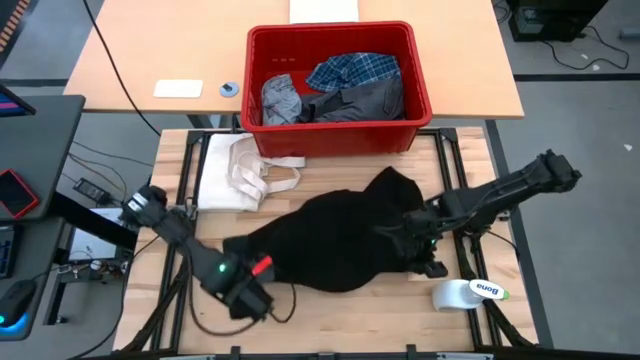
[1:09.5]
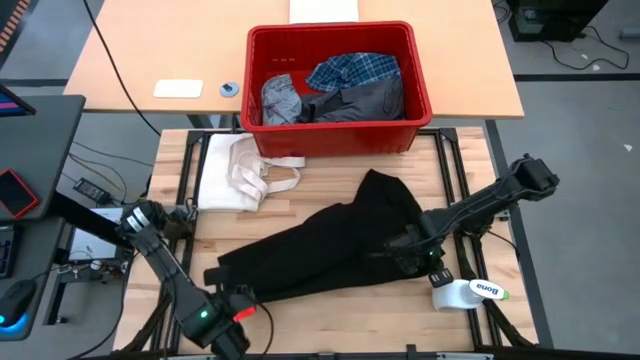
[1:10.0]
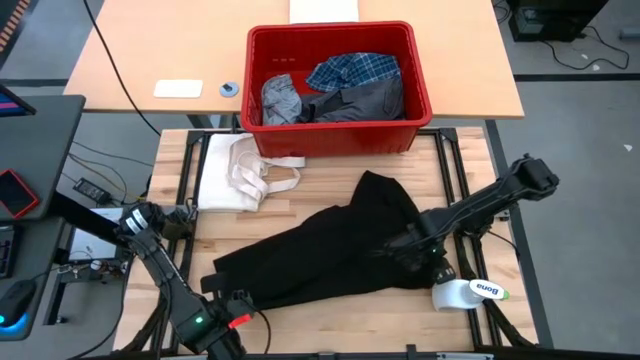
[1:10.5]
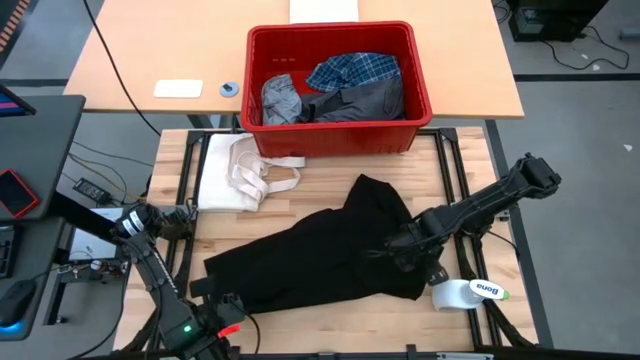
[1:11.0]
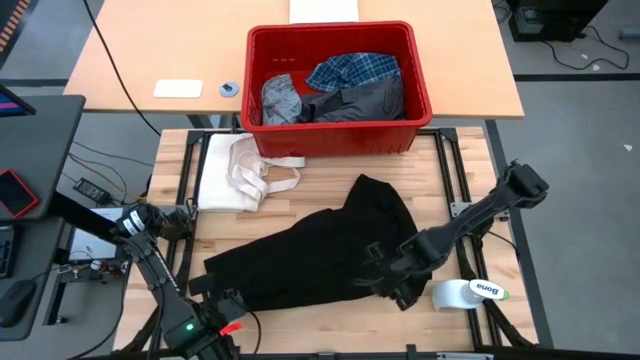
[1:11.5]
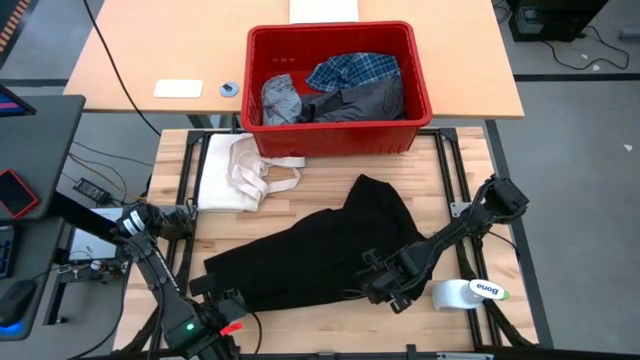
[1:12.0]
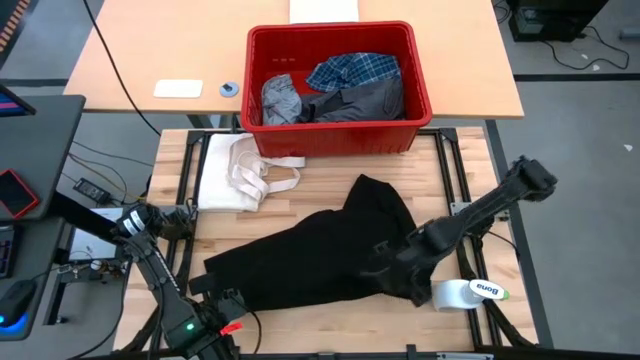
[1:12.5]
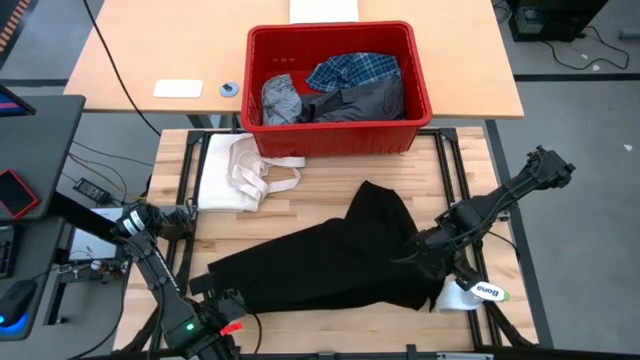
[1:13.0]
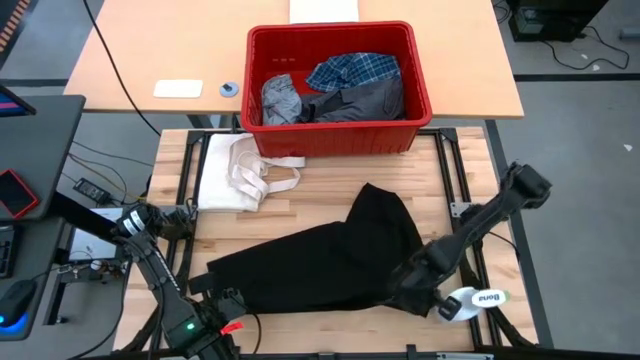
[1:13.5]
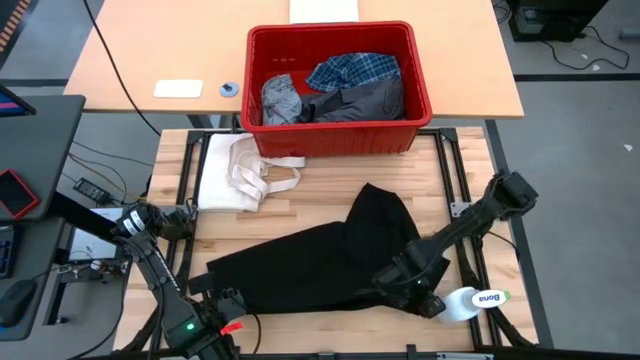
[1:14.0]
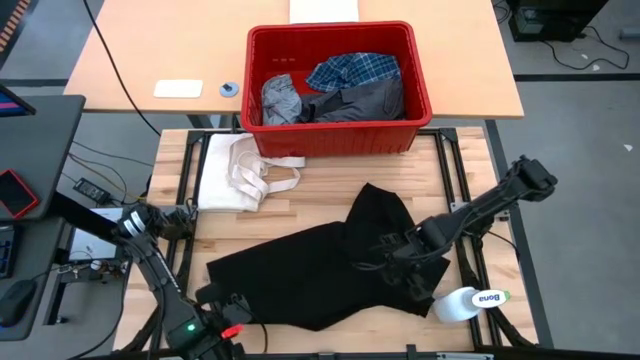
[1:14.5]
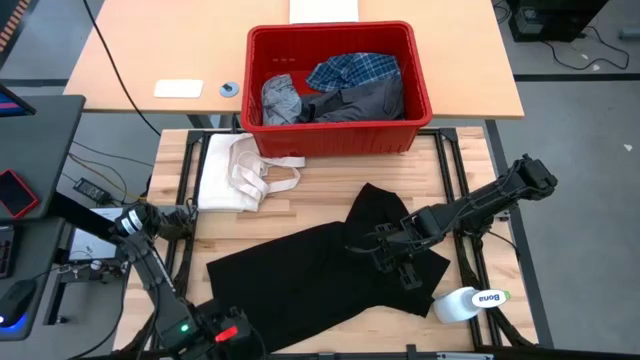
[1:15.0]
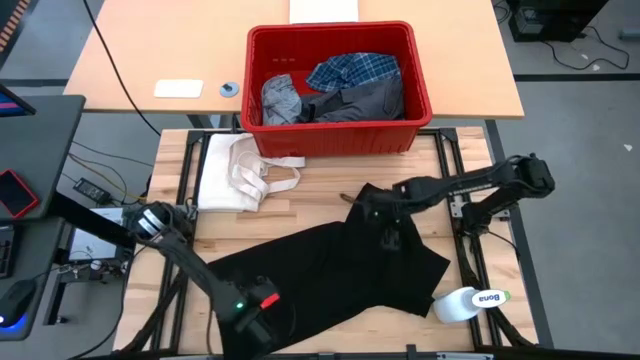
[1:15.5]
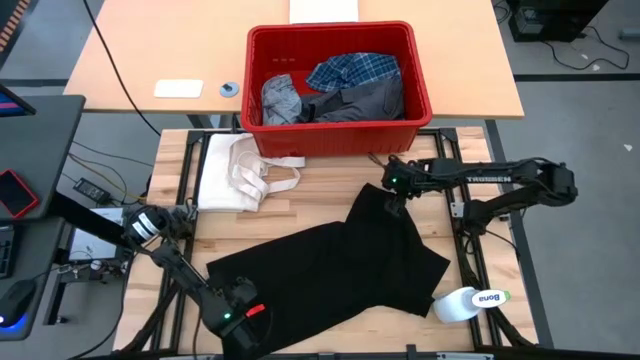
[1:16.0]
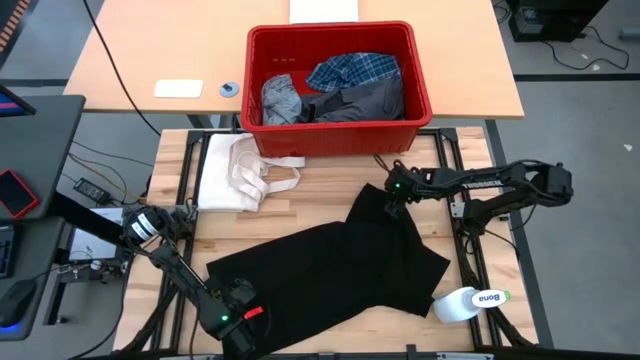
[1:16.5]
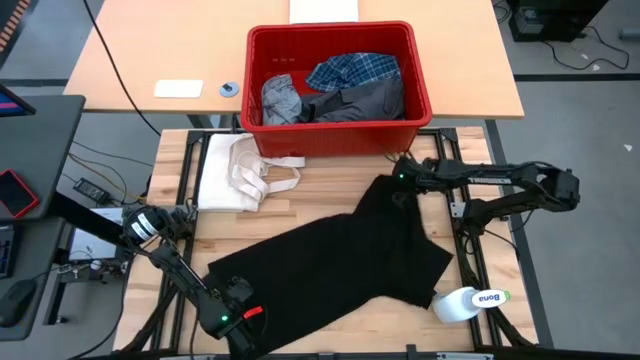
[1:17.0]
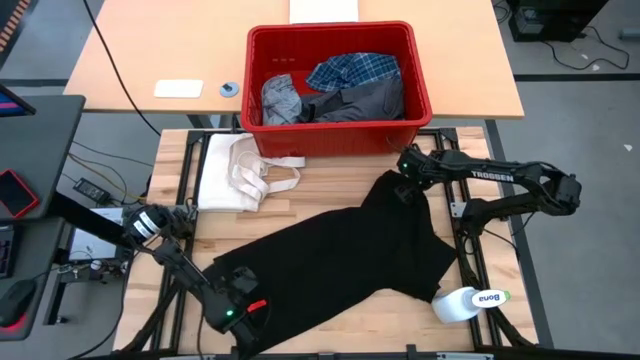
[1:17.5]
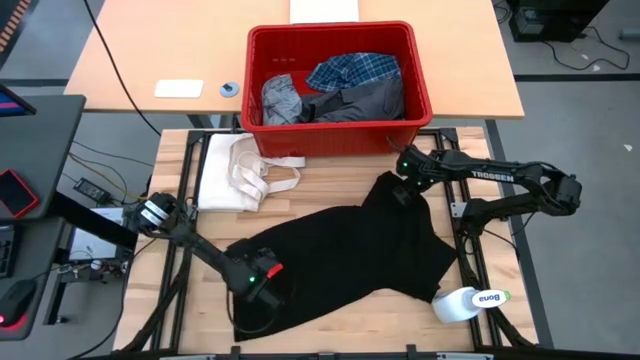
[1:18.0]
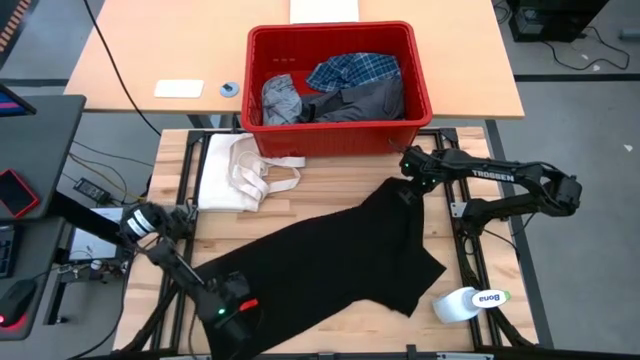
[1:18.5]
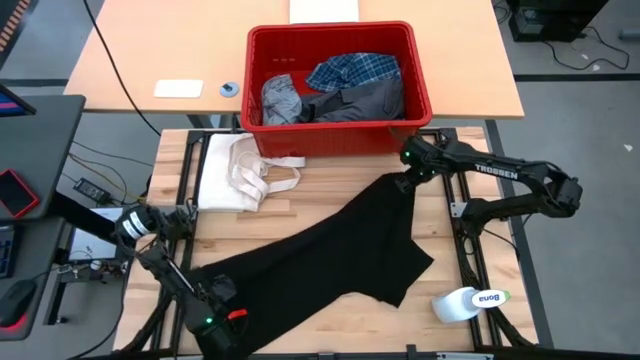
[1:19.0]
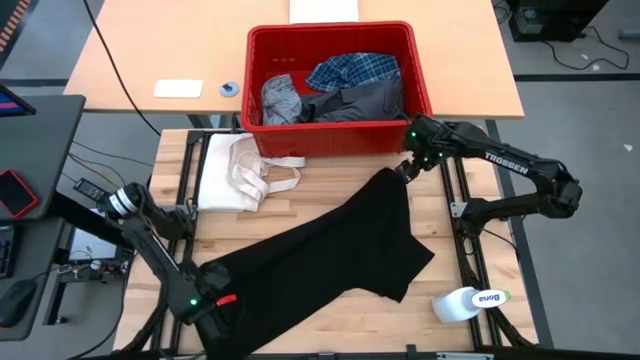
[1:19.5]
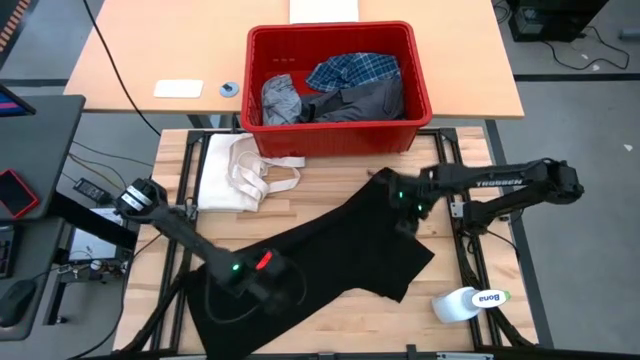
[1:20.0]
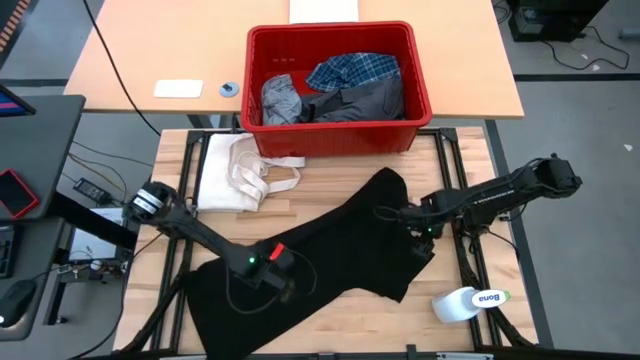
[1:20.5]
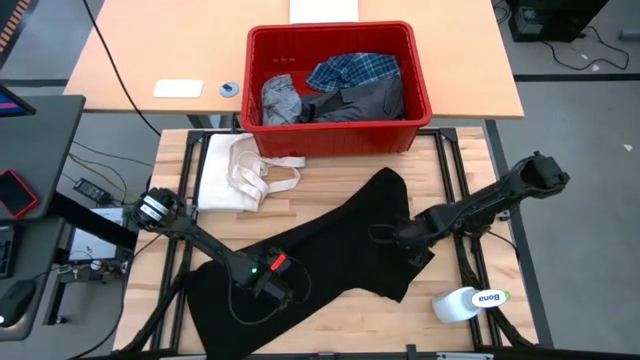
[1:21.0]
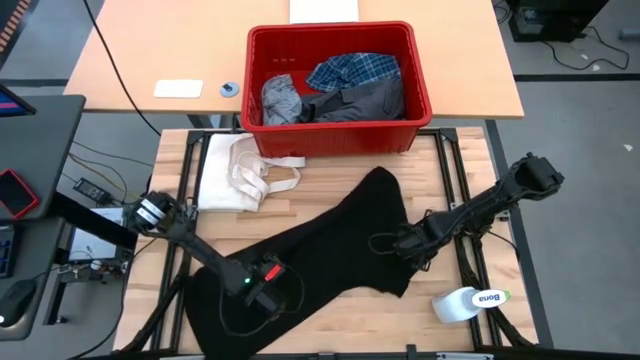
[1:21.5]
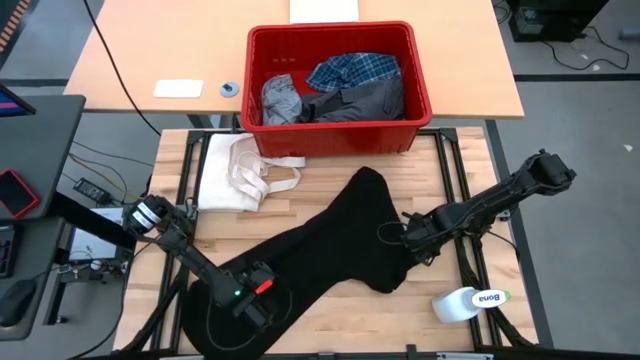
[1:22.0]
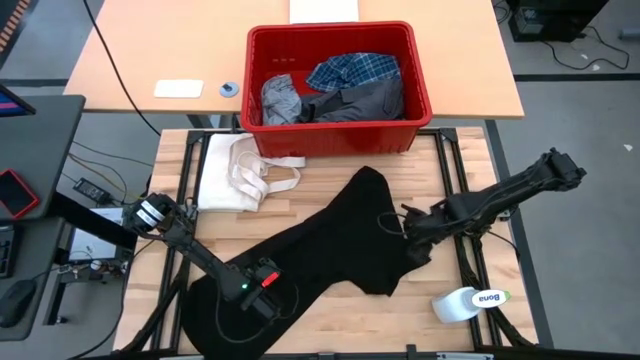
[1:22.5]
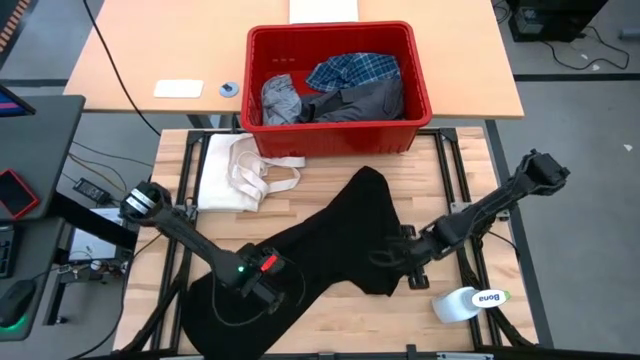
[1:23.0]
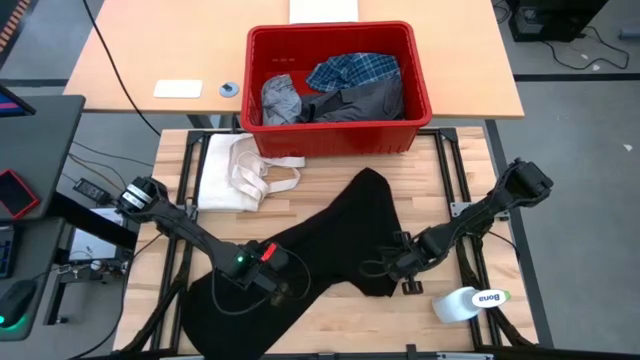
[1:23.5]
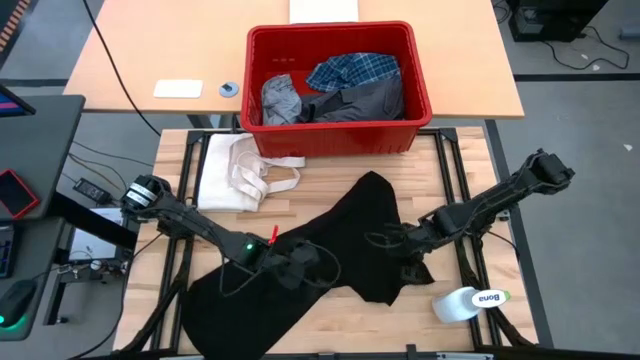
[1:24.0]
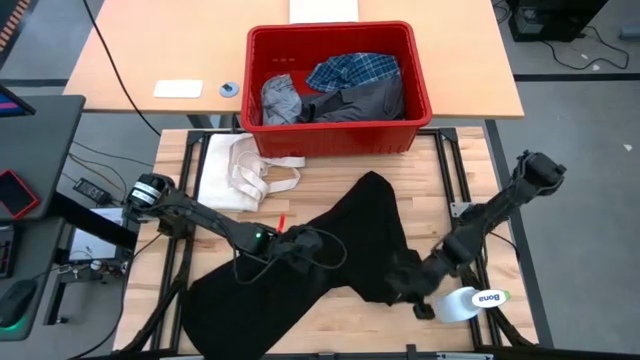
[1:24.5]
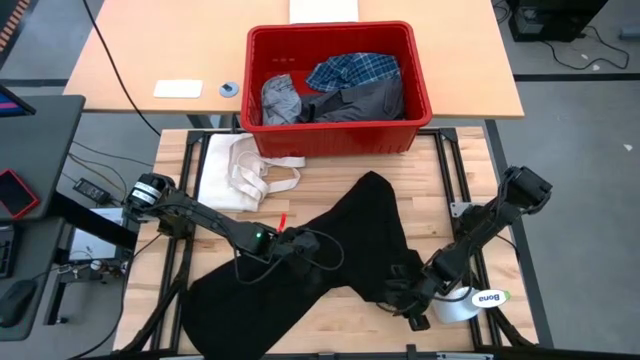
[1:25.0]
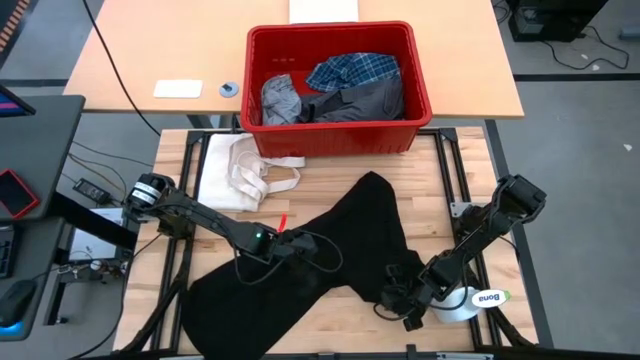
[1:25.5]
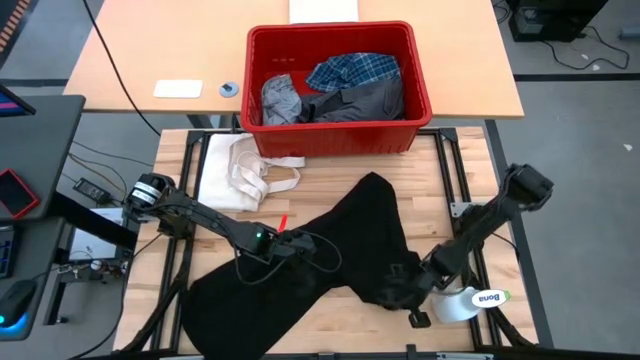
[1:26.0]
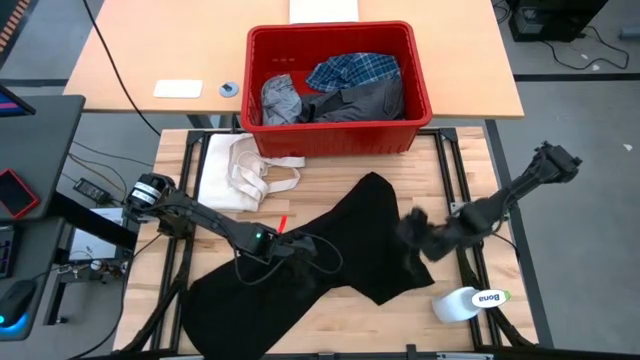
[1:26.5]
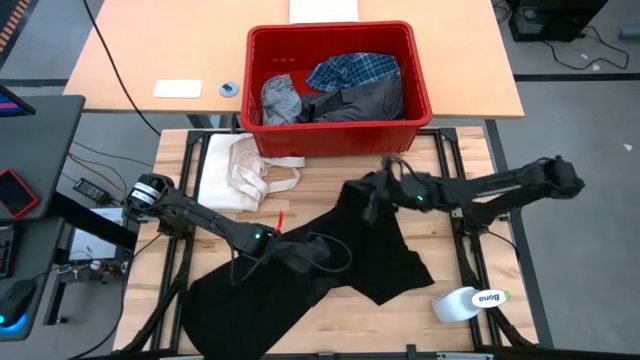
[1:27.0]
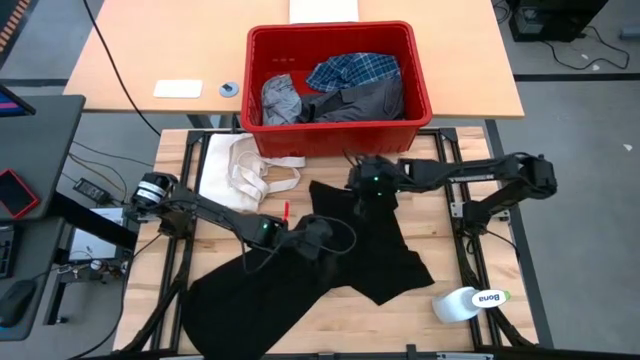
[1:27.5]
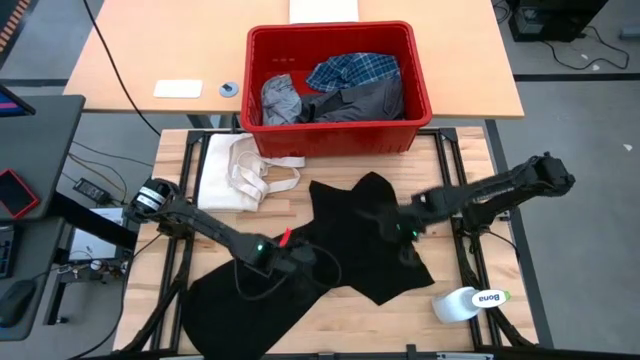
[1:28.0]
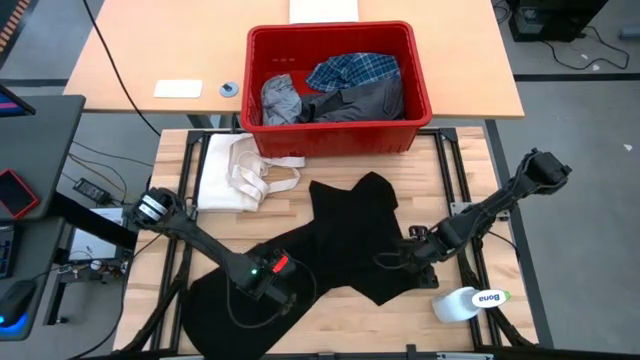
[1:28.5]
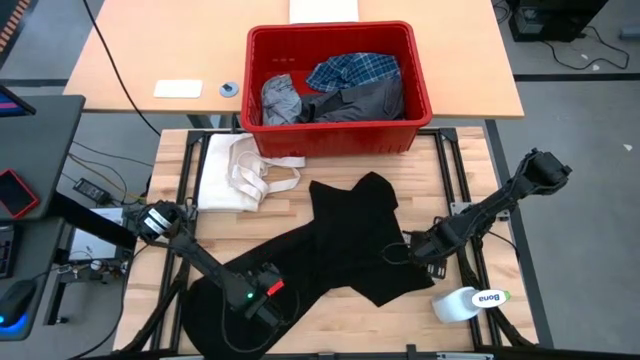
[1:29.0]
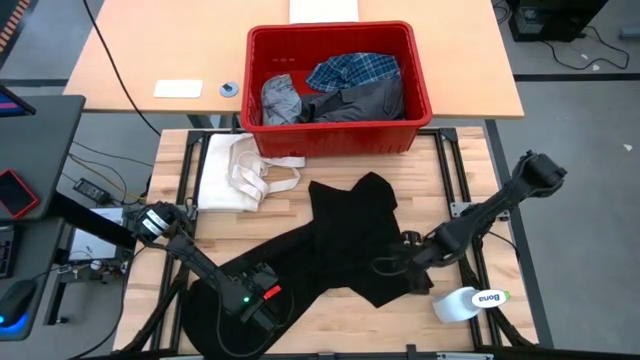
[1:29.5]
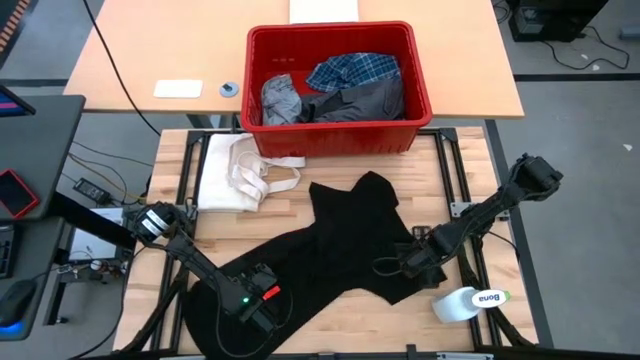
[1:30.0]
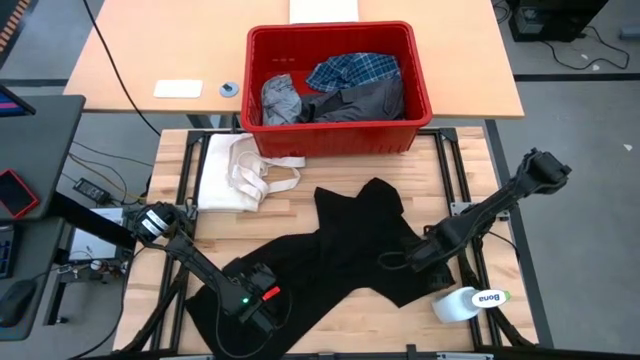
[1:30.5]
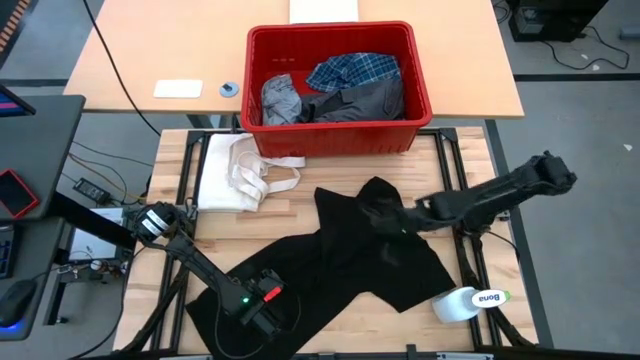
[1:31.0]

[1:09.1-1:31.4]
Task: Fold Laundry from Bin
Fold the black shirt
